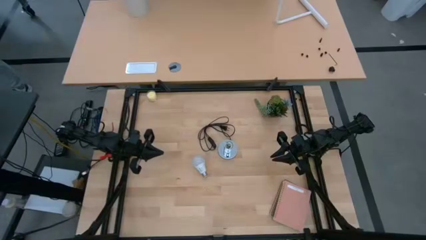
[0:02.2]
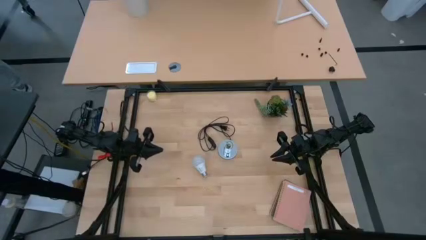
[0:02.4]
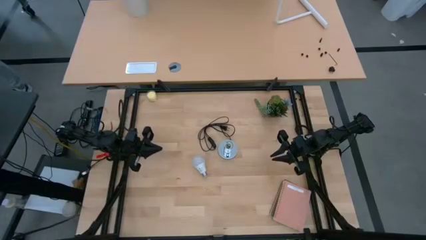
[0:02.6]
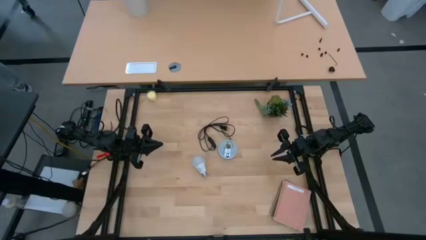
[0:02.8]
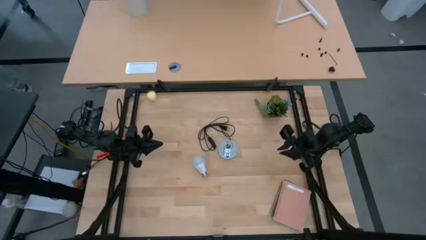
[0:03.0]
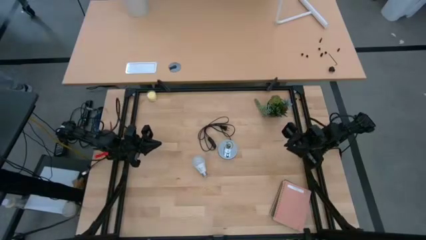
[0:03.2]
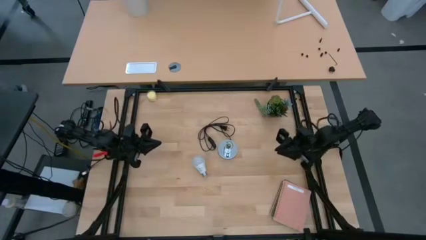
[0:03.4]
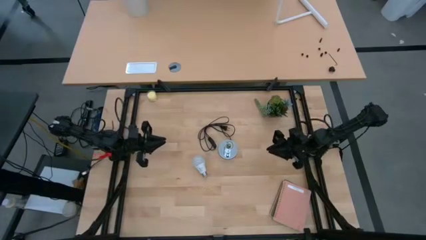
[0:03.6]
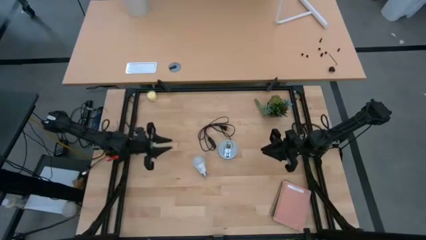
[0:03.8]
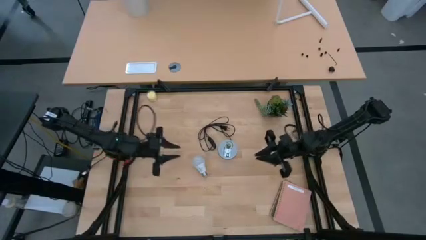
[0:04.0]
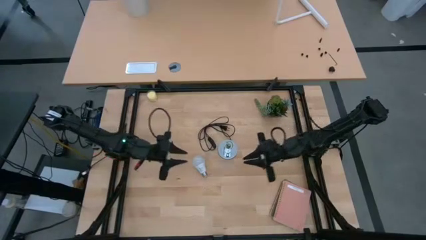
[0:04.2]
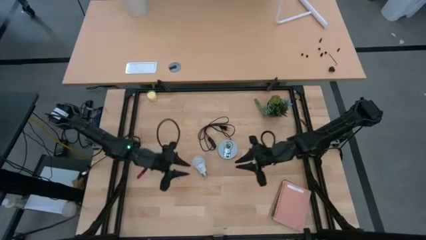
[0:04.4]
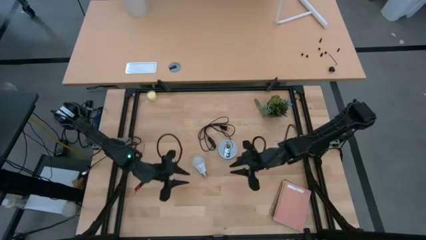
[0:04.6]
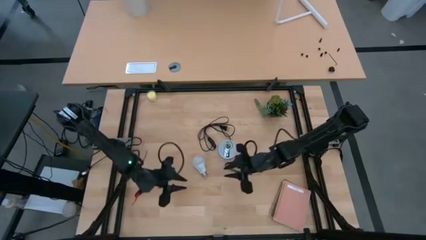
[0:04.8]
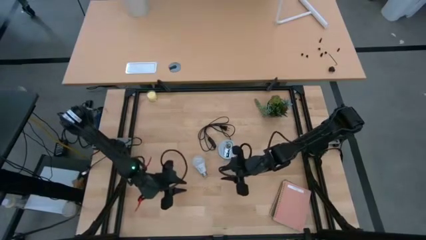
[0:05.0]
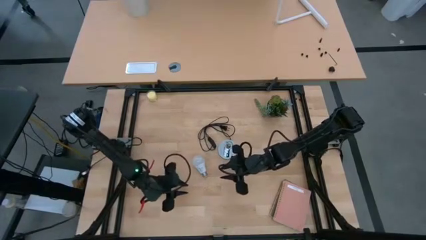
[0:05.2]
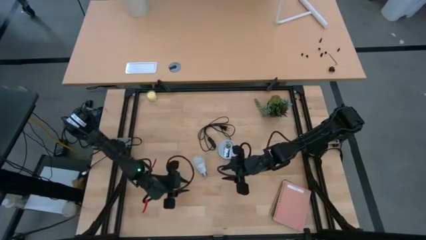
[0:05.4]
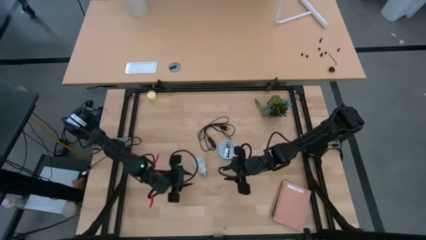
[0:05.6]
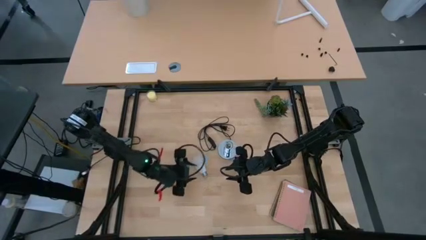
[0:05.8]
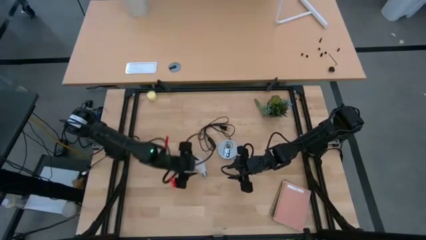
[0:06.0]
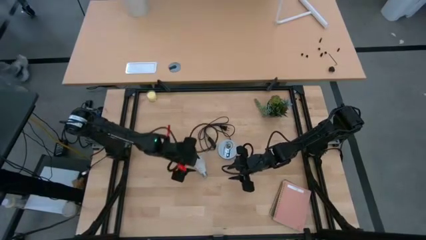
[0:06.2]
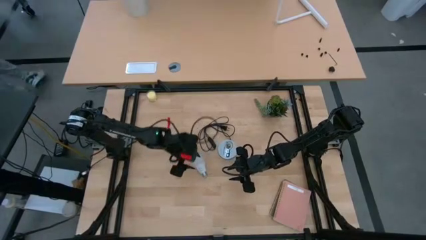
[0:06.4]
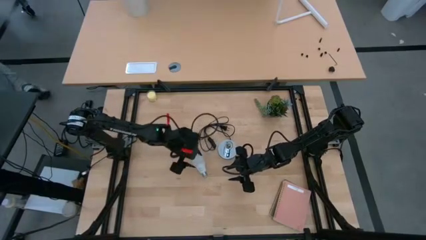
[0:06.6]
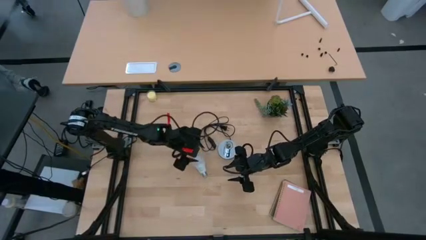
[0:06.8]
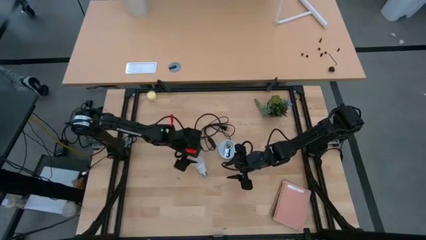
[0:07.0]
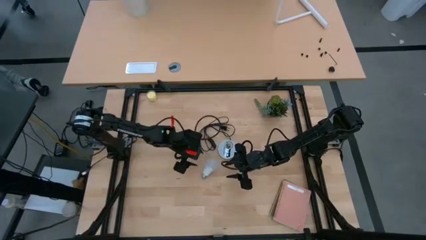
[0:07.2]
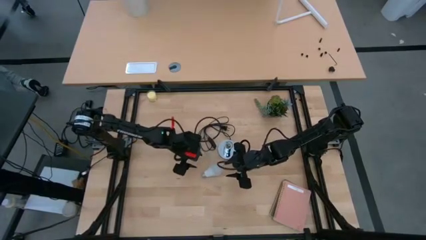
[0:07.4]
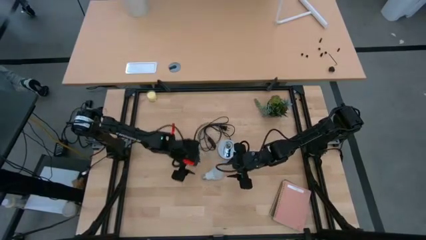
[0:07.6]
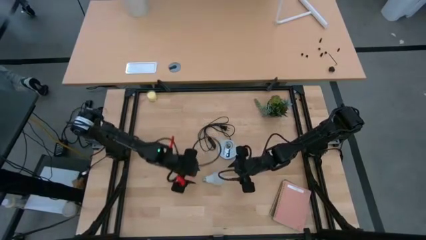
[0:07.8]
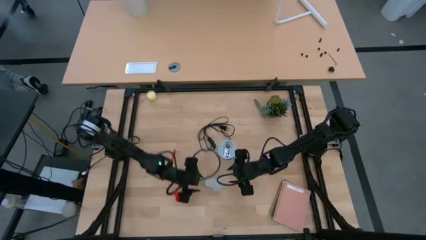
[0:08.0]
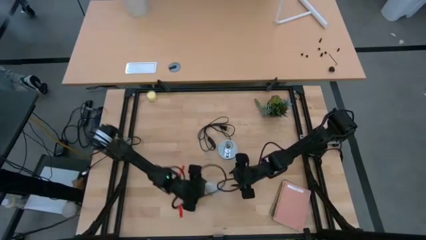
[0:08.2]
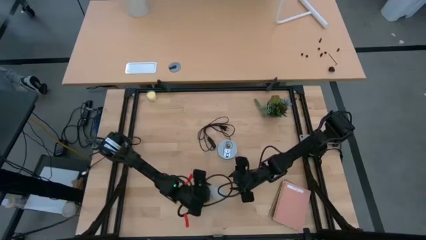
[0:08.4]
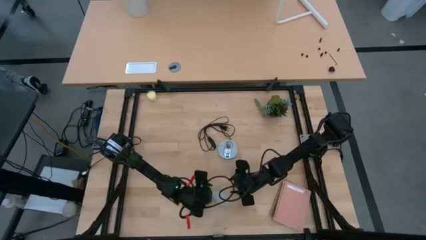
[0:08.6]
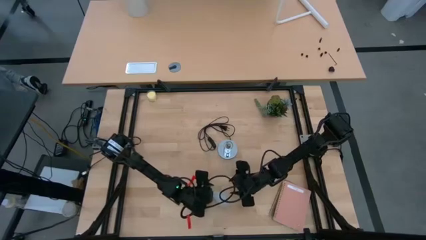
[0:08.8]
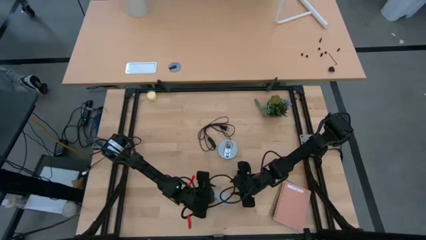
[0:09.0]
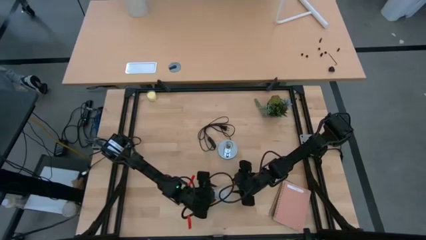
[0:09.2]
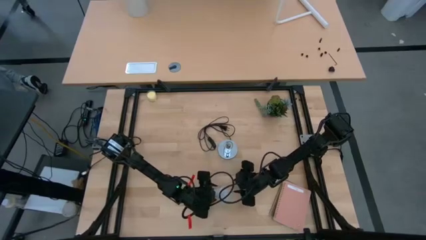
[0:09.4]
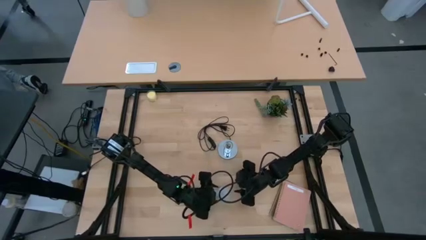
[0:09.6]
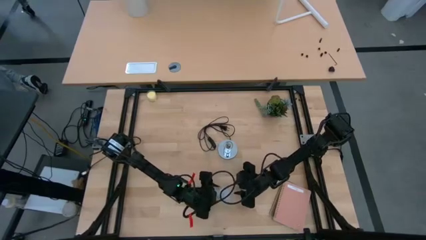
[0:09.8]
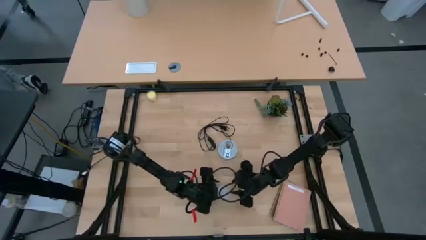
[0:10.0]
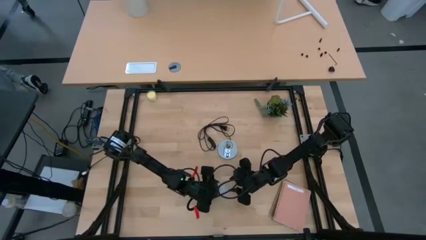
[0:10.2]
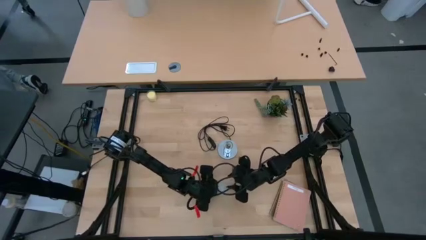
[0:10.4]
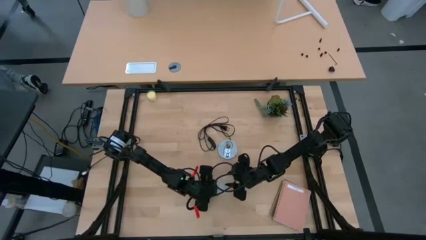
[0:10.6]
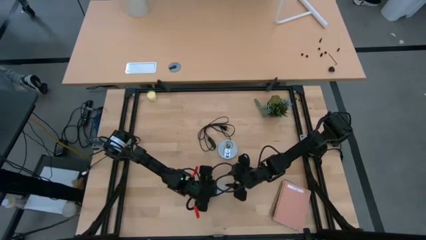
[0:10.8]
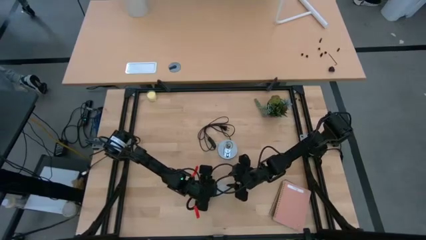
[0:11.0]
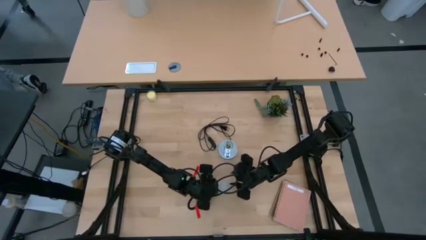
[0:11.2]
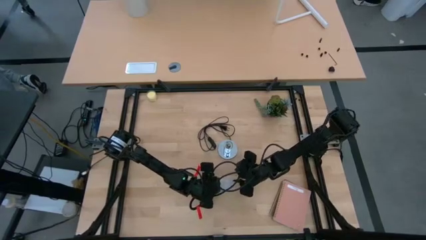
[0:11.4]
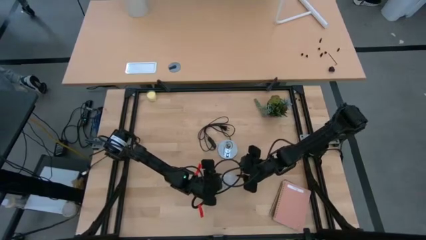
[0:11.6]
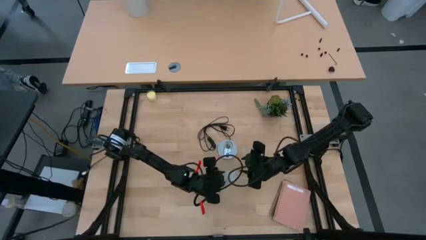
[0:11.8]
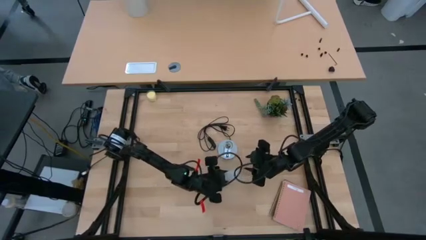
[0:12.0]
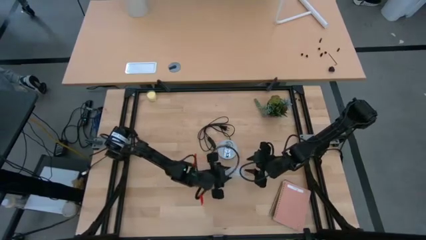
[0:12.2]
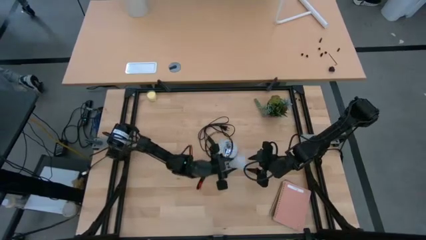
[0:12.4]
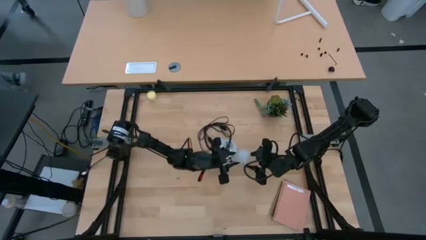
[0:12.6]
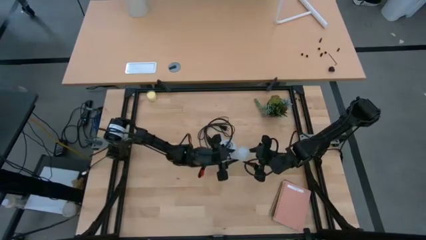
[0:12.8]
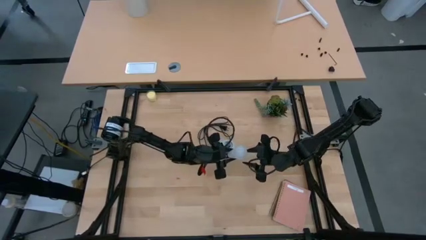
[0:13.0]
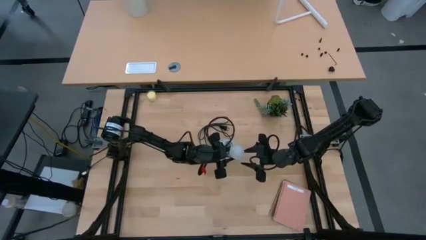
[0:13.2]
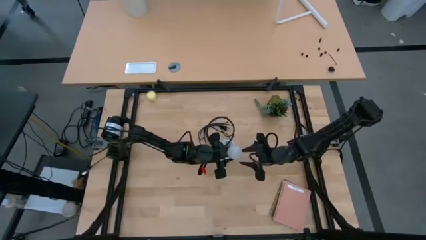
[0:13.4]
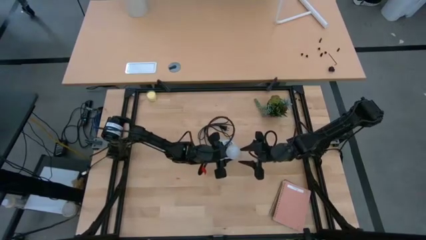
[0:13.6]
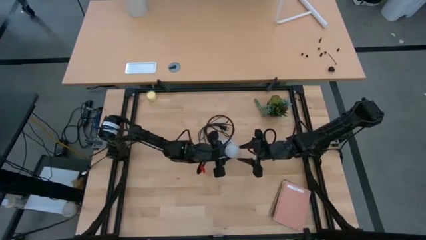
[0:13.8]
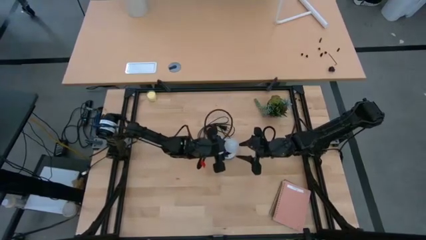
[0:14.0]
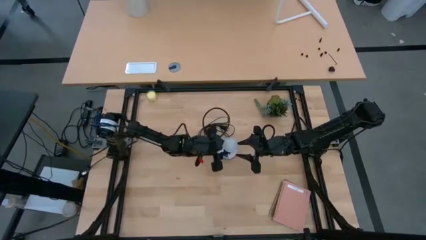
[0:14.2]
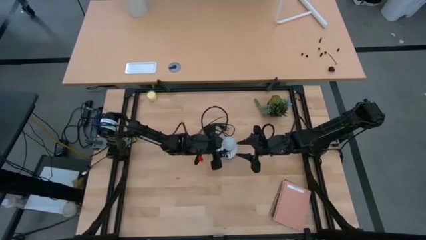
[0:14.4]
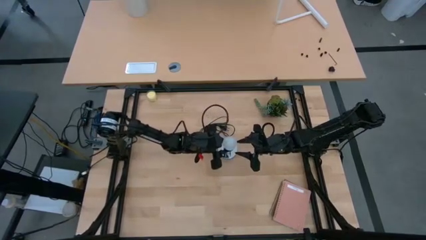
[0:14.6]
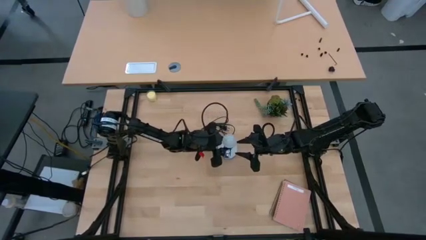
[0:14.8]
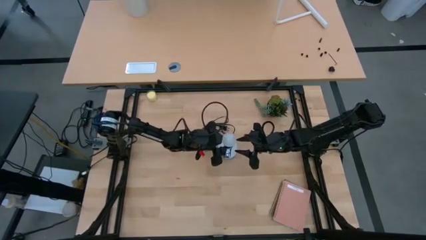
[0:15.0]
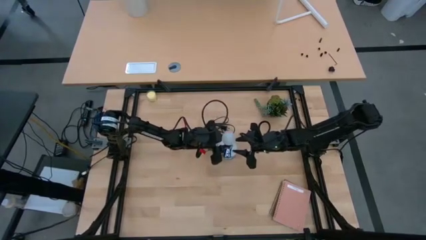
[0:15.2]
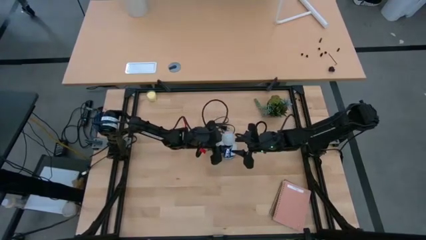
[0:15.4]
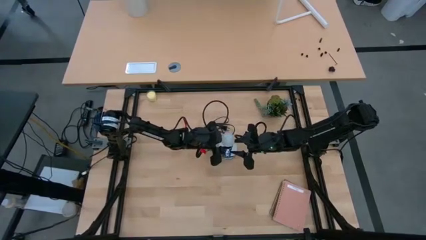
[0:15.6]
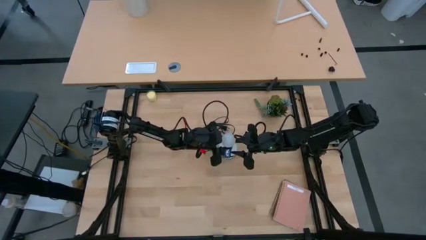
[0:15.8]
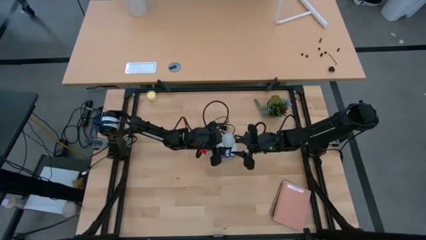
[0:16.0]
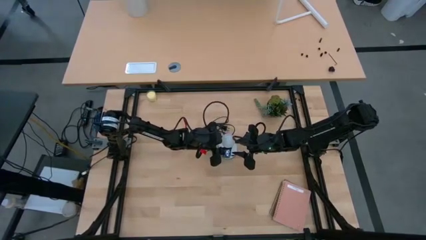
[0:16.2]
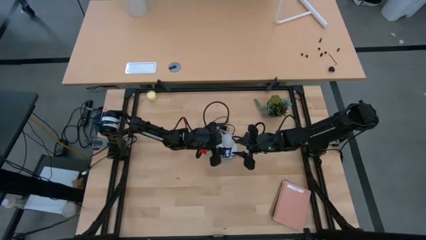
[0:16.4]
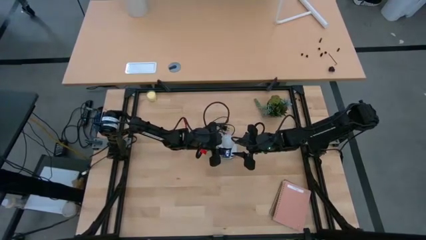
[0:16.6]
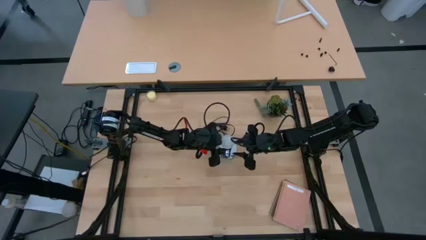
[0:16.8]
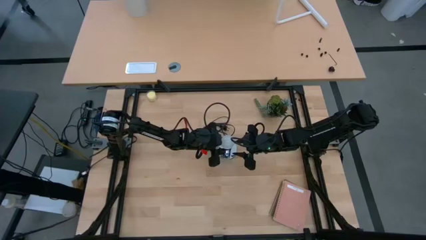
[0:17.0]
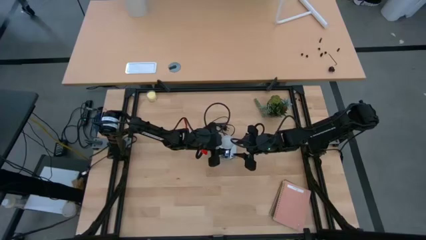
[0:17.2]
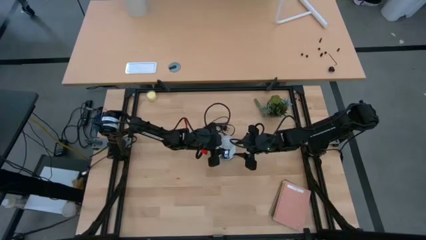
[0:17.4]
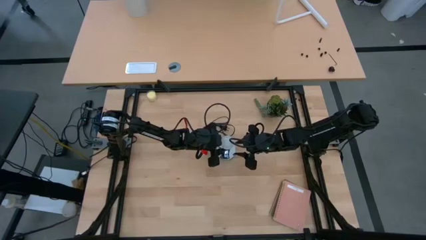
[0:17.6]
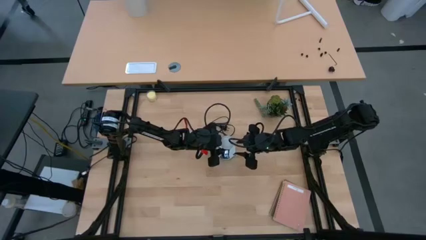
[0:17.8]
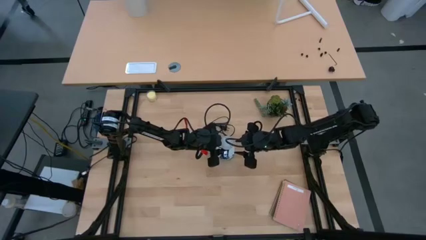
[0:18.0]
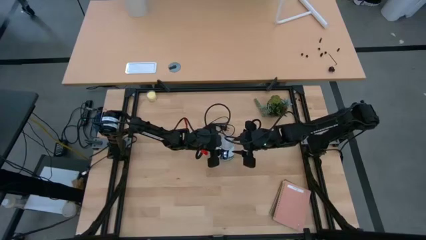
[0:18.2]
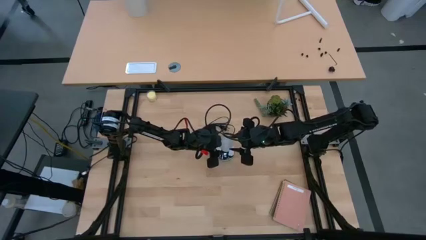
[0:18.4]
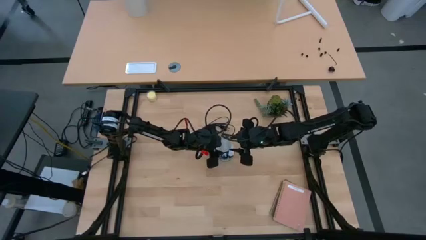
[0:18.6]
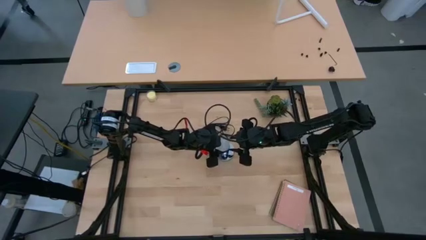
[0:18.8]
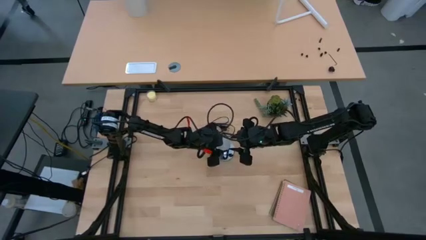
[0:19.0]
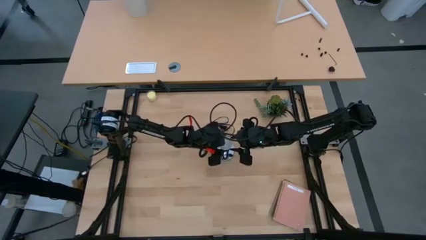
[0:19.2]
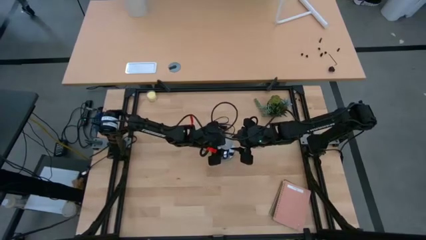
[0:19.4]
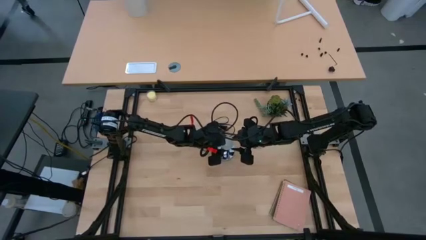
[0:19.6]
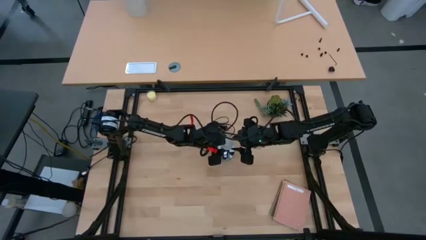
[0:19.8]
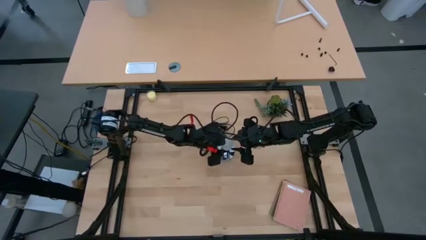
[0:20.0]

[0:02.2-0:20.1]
Task: Screw lightbulb
Insert the white lightbulb into the lamp
